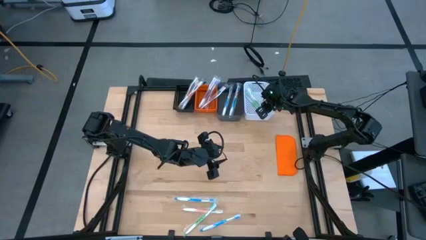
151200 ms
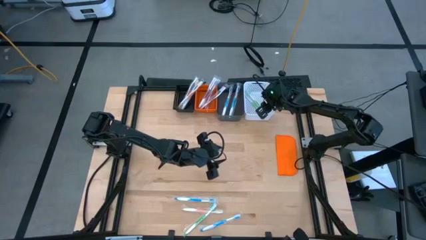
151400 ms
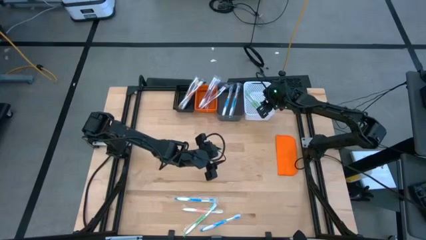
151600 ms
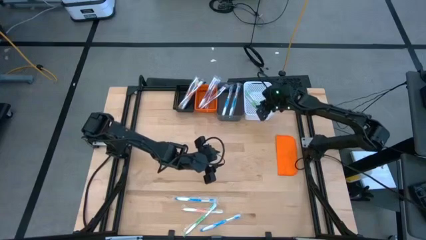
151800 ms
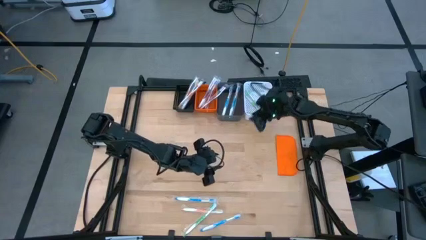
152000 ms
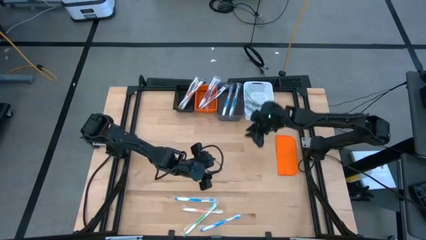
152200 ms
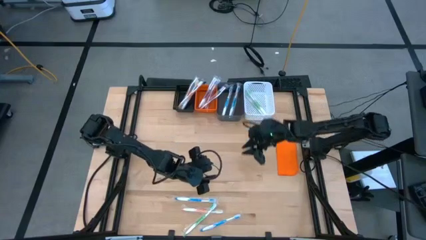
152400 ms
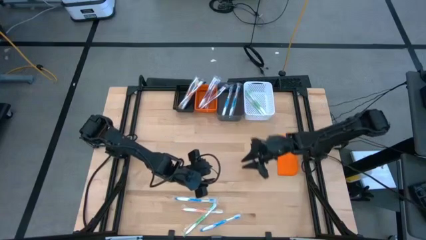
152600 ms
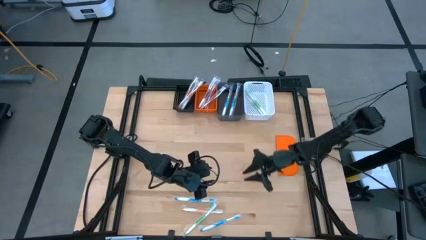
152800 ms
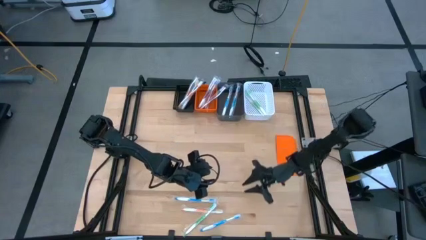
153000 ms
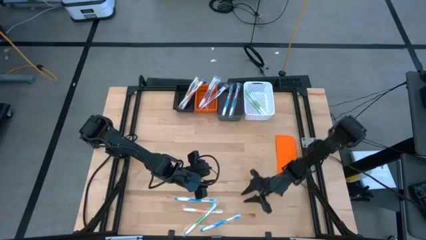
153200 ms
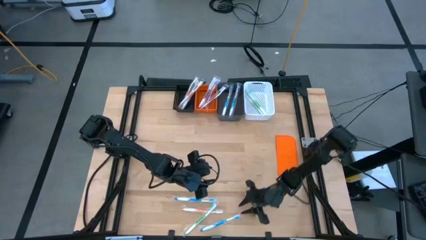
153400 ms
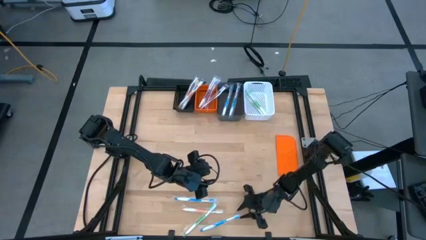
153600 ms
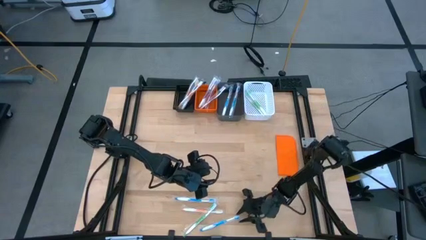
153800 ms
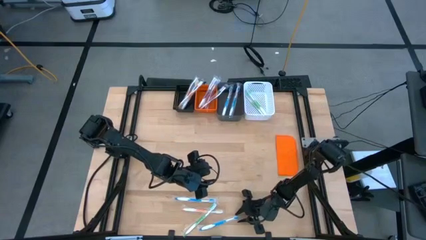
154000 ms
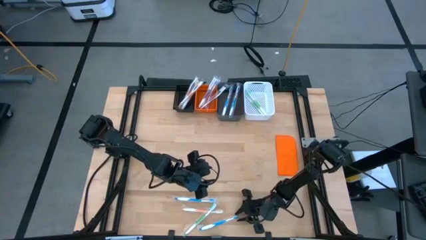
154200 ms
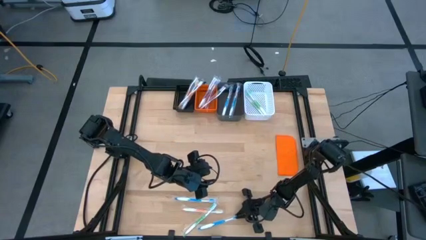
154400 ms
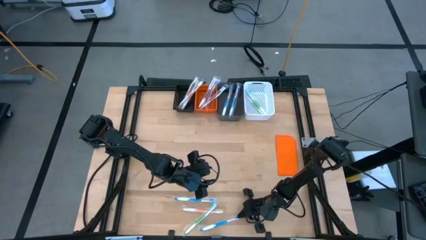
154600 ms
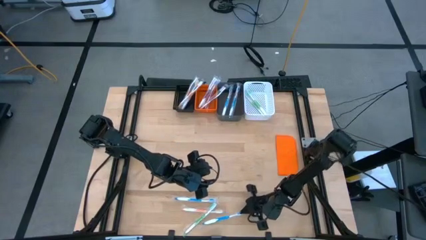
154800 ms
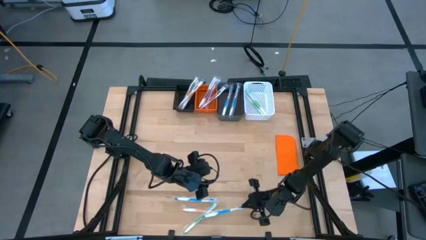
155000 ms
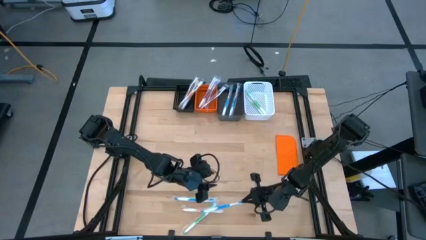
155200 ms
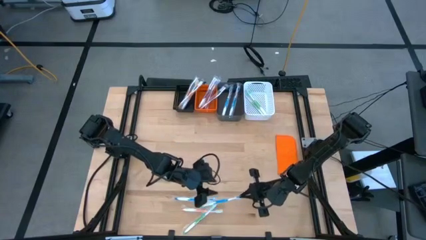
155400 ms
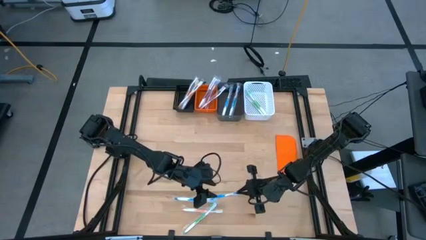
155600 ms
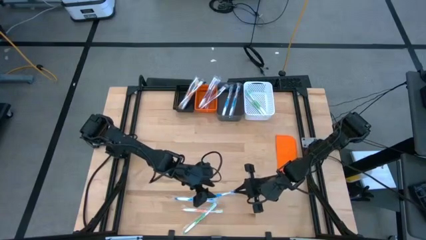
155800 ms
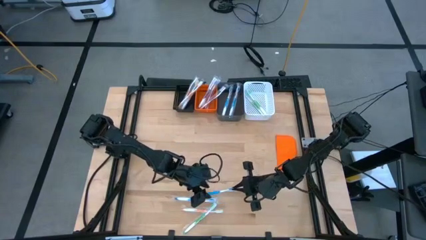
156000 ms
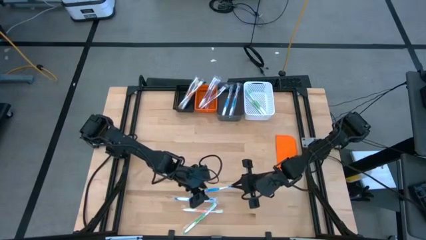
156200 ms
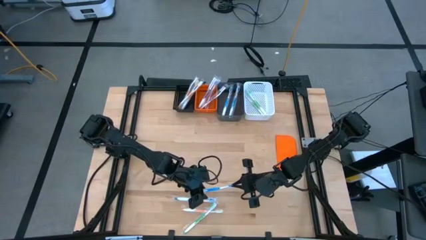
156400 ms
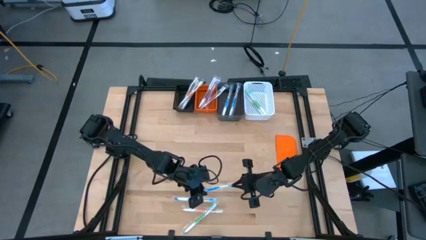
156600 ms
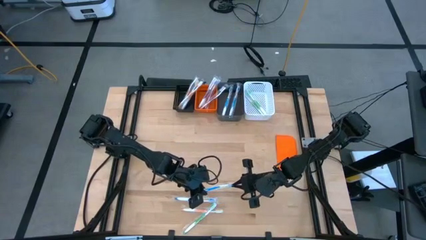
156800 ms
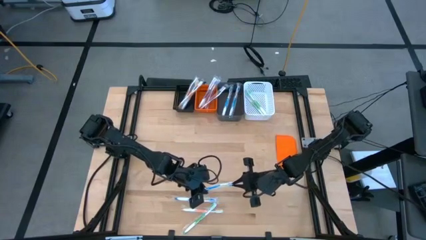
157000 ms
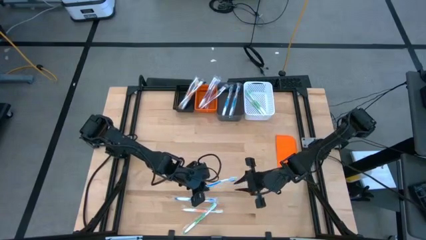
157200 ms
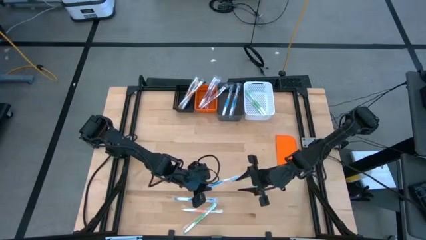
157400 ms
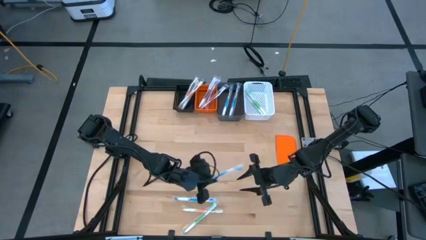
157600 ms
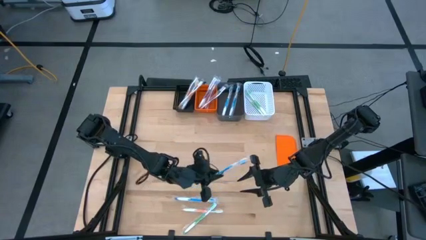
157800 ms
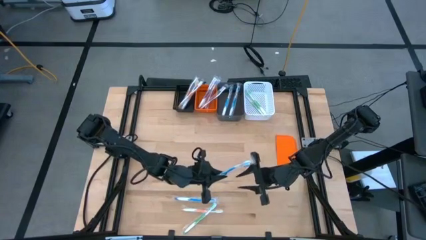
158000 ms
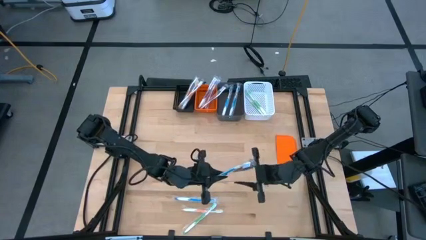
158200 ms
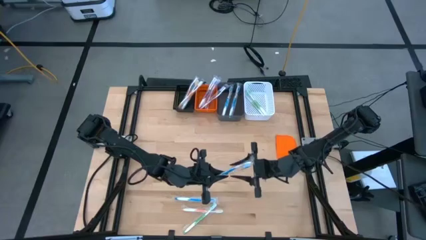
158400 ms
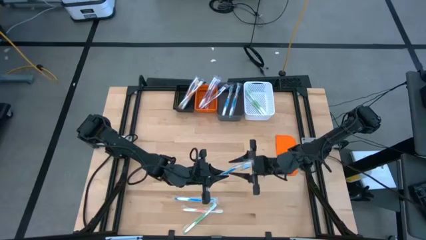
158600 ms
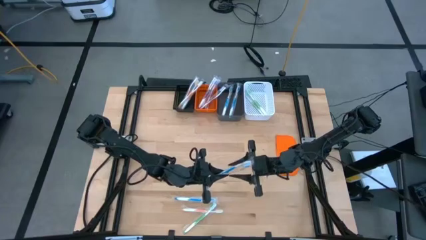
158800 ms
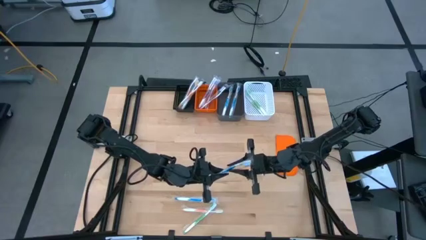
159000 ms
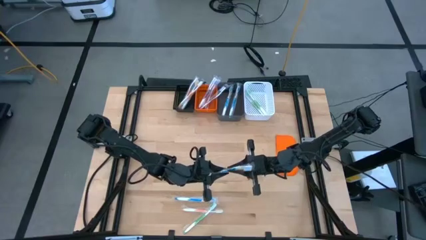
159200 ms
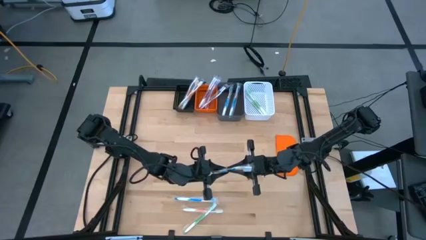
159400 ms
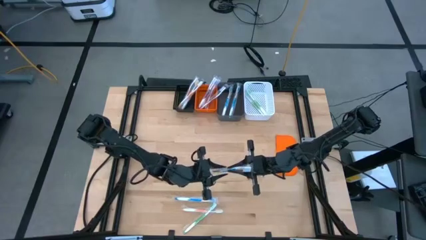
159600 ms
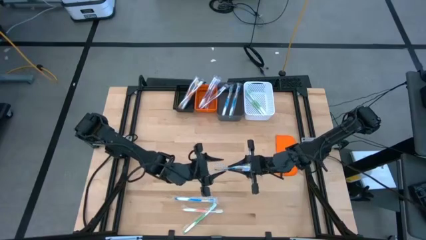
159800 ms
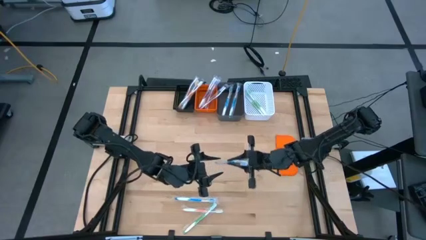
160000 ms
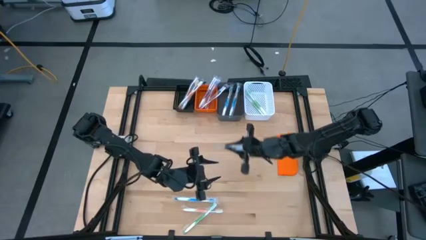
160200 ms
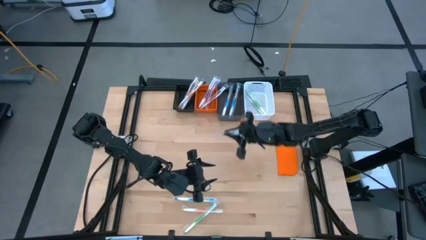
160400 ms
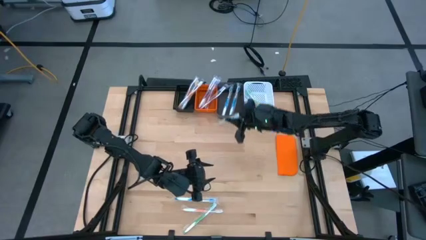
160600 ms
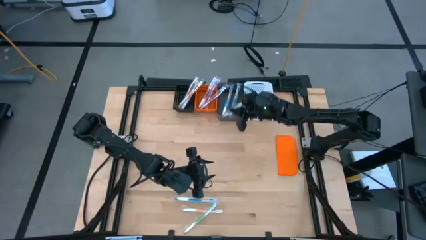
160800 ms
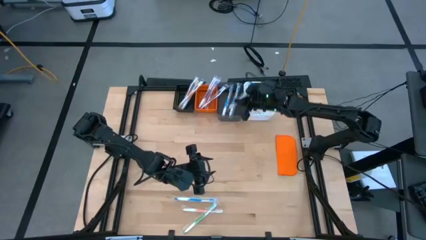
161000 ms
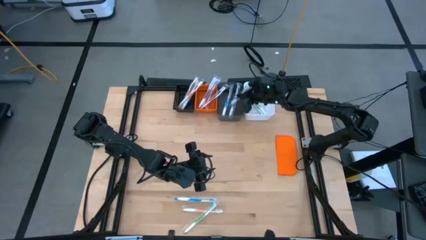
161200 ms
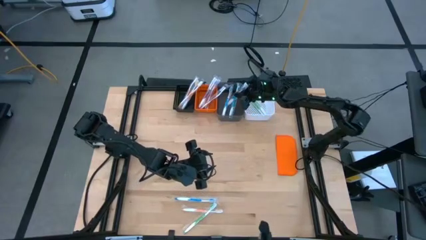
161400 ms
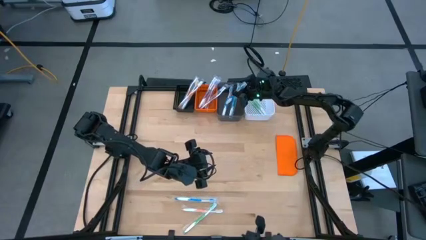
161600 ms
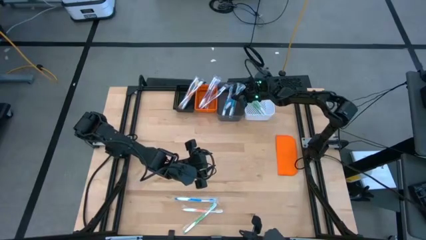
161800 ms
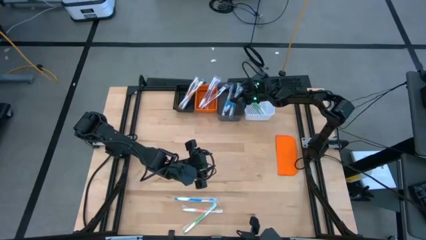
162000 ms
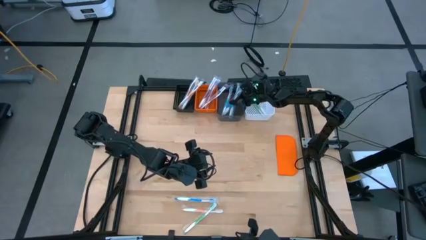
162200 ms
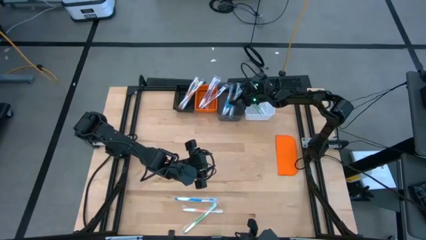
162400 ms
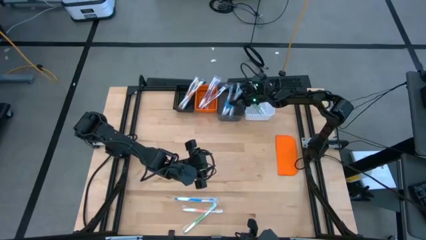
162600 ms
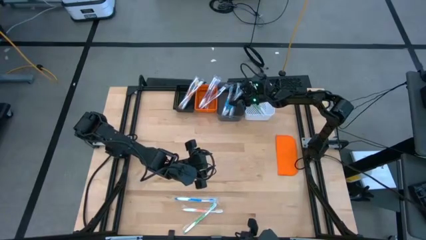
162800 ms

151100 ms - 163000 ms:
Task: Pick & Place Toothbrushes
Put the blue toothbrush into the gray bin

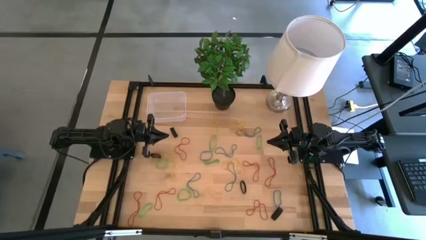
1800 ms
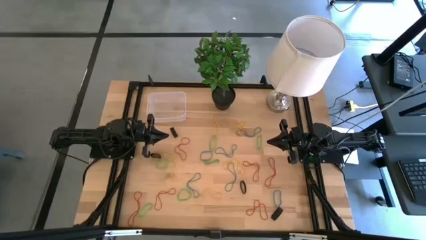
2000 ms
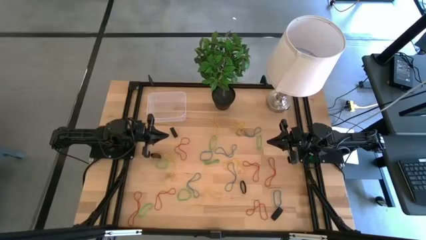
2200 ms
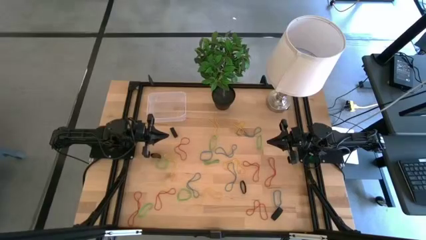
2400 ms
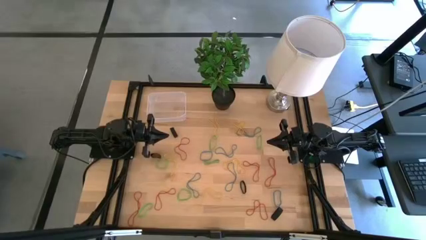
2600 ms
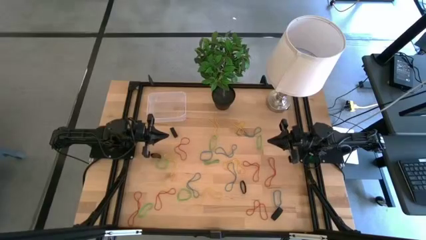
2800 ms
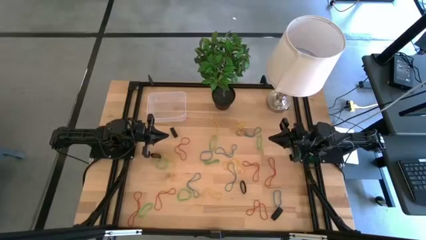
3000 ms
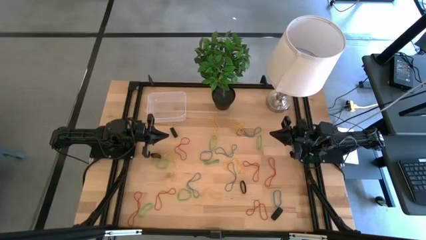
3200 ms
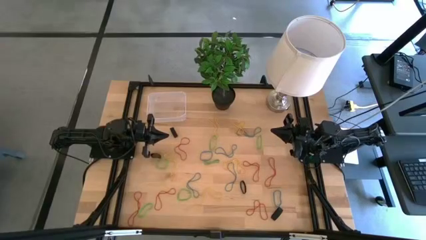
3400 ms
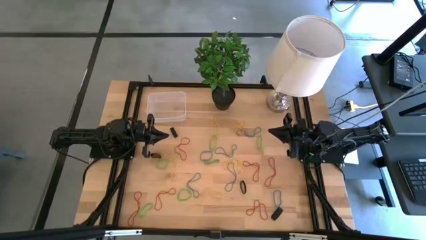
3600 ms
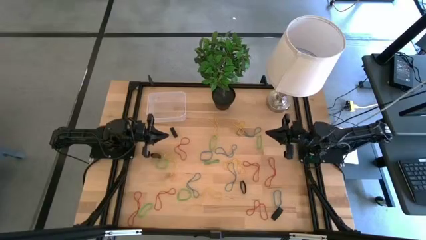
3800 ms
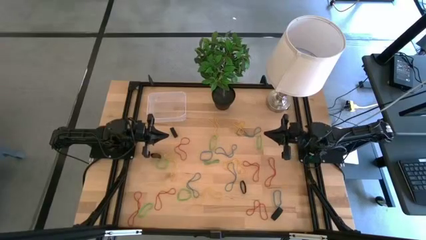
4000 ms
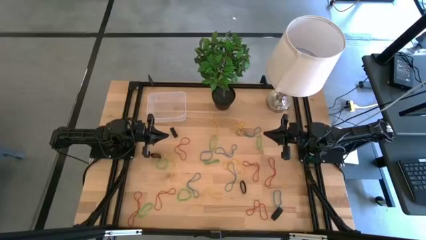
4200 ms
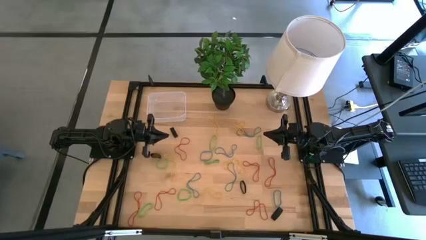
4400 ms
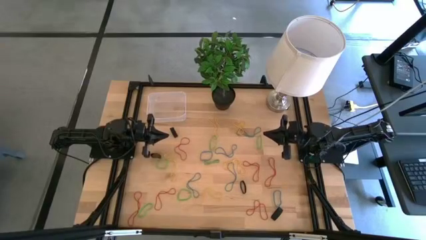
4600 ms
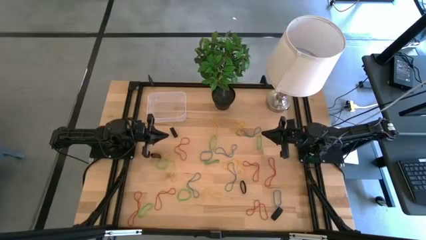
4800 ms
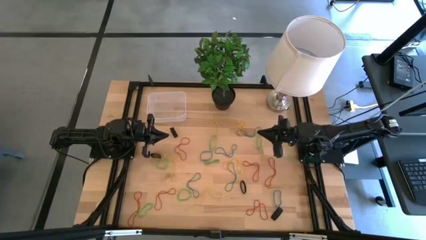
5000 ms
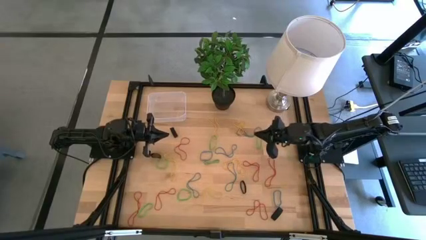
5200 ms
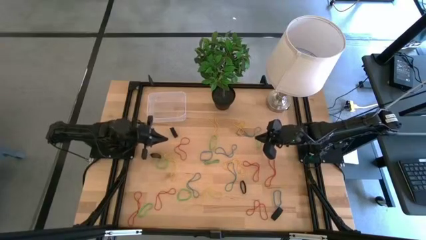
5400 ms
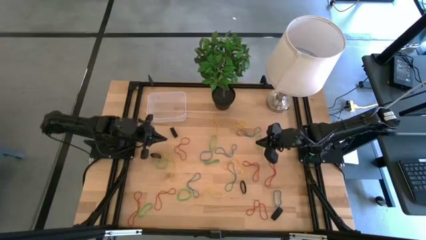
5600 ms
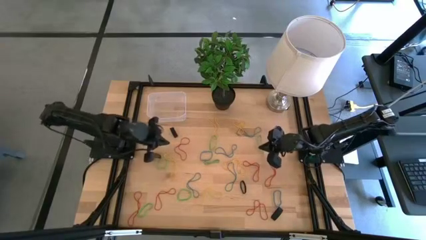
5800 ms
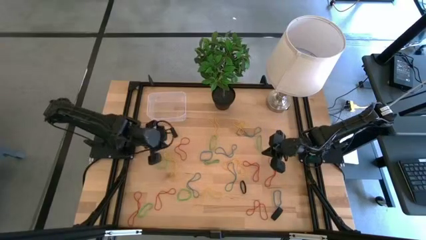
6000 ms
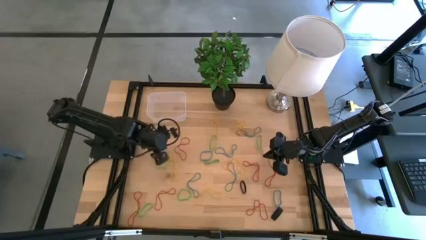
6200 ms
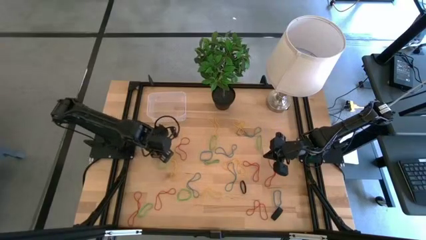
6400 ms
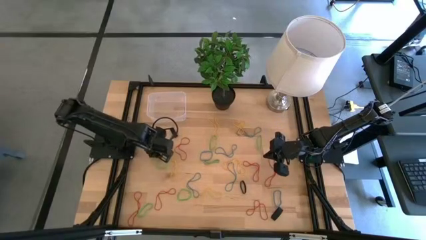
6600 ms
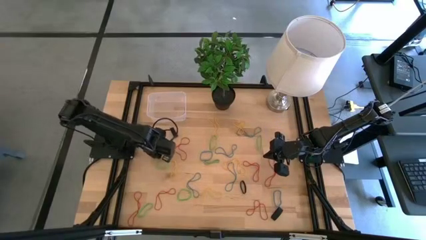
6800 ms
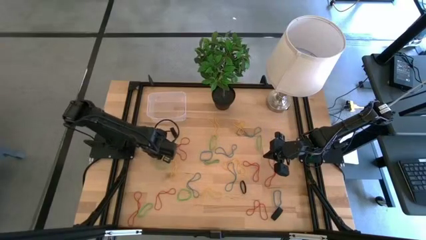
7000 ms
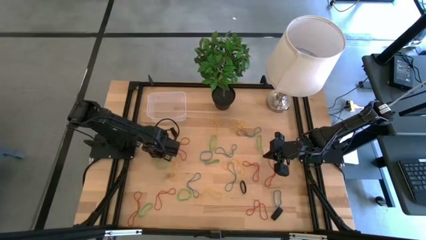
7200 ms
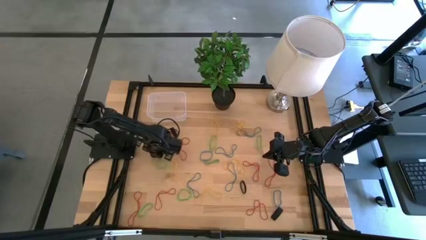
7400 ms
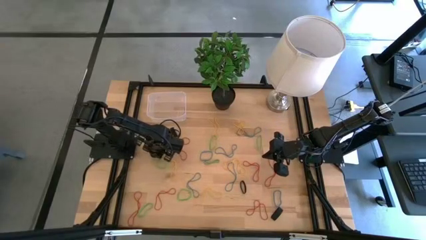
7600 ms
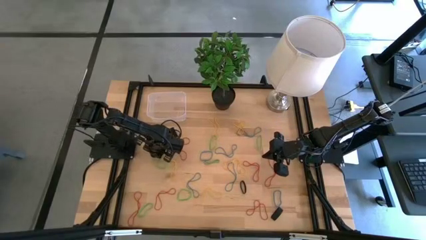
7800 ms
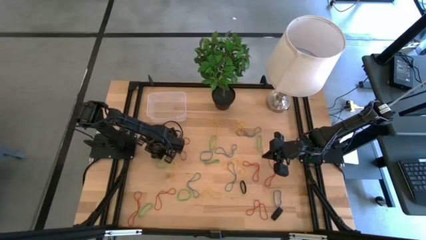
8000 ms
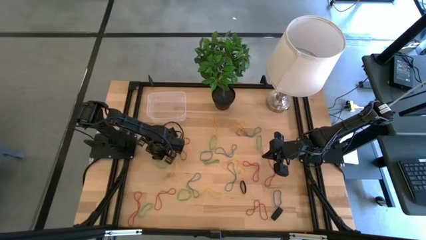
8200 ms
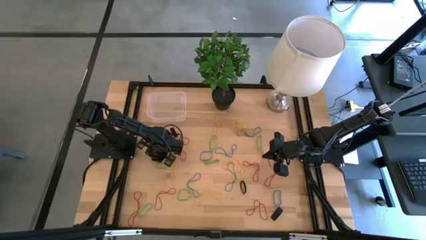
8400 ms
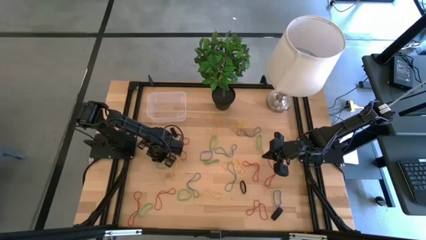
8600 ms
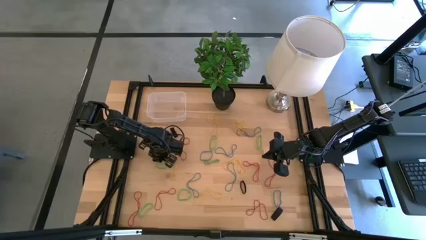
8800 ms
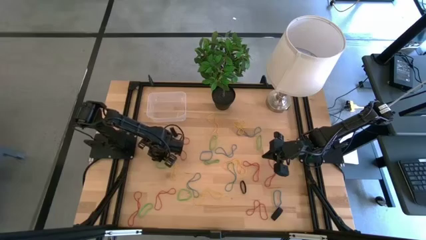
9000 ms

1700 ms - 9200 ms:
Task: Pick and place rubber bands into bin
Put the black rubber band into the transparent bin
